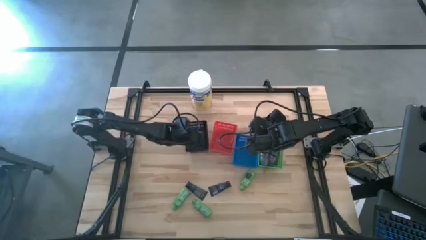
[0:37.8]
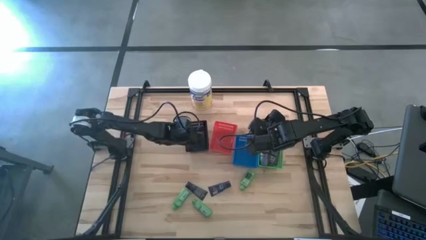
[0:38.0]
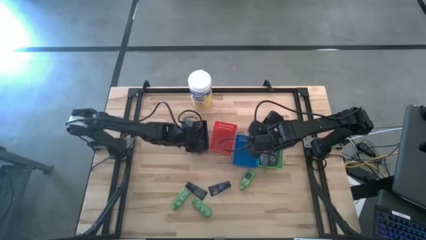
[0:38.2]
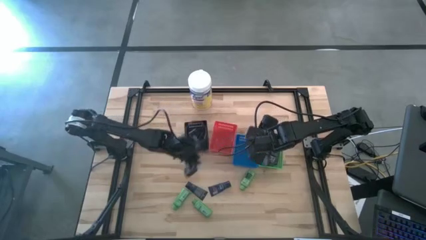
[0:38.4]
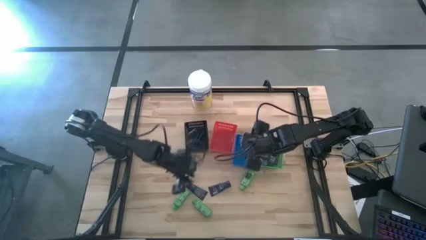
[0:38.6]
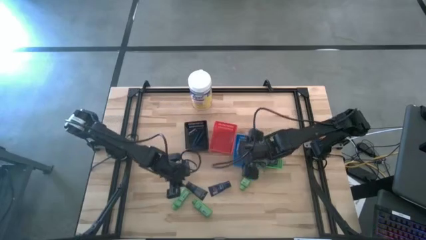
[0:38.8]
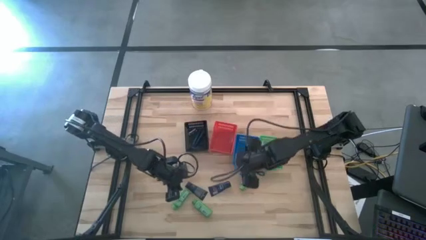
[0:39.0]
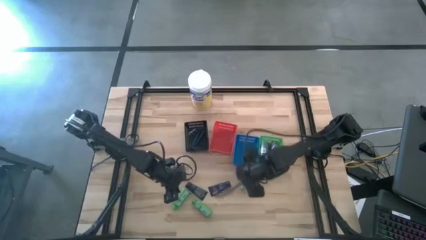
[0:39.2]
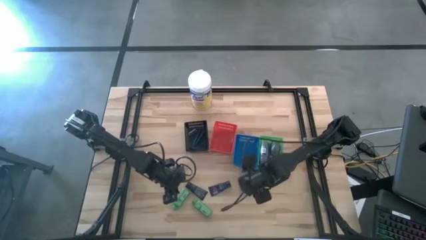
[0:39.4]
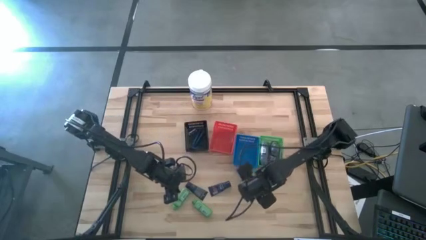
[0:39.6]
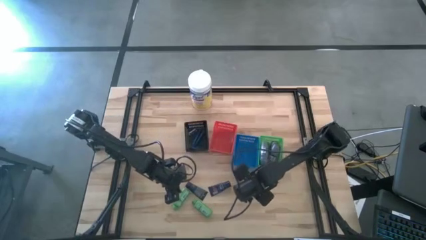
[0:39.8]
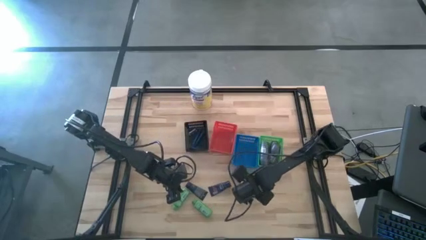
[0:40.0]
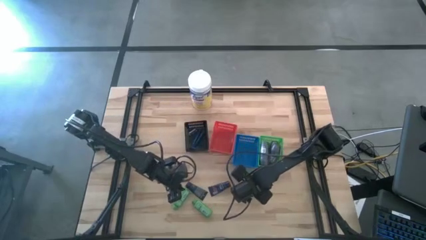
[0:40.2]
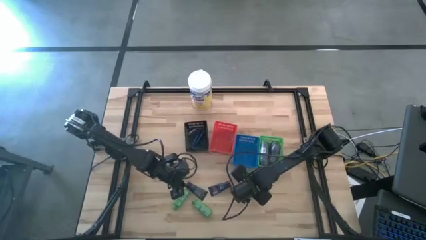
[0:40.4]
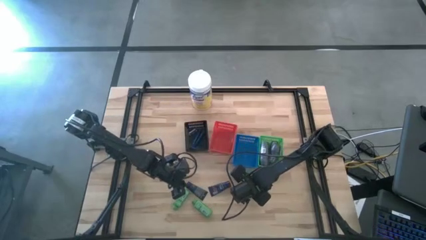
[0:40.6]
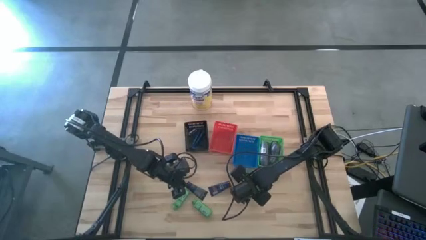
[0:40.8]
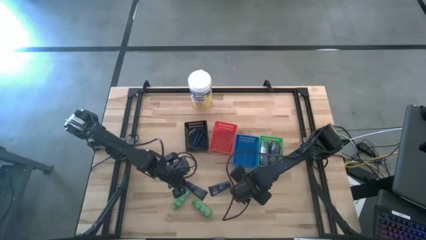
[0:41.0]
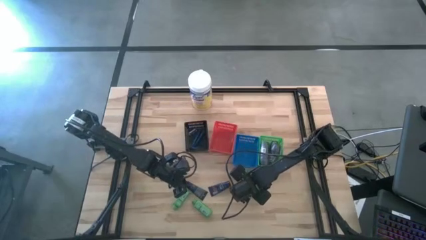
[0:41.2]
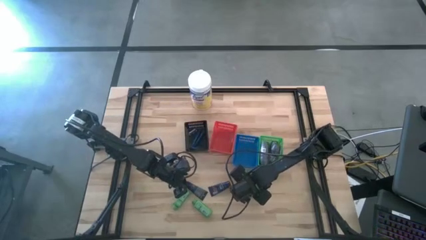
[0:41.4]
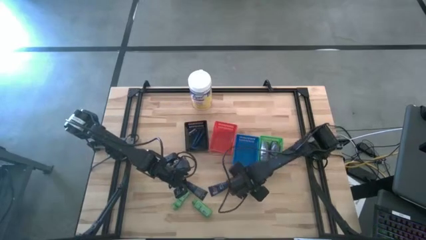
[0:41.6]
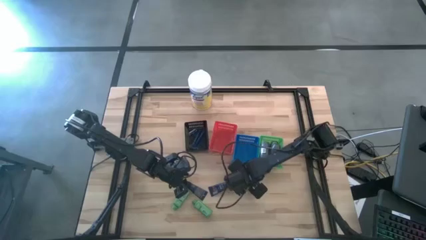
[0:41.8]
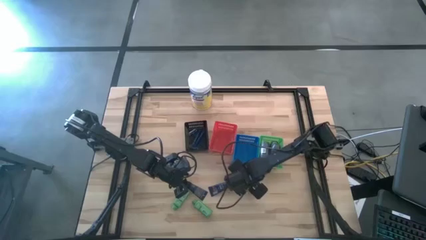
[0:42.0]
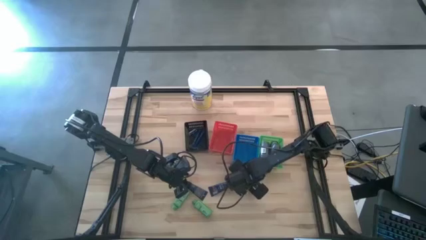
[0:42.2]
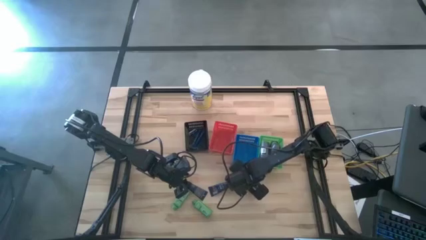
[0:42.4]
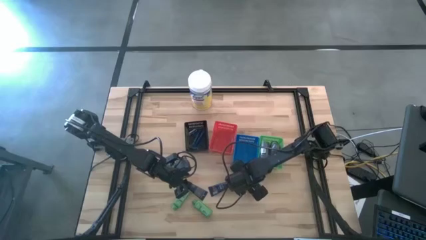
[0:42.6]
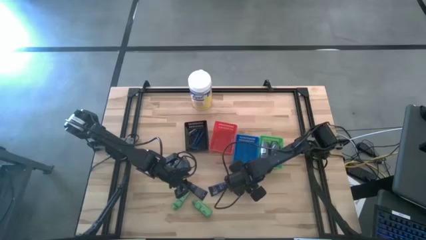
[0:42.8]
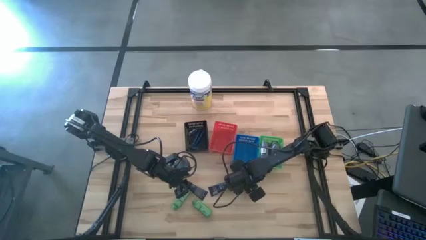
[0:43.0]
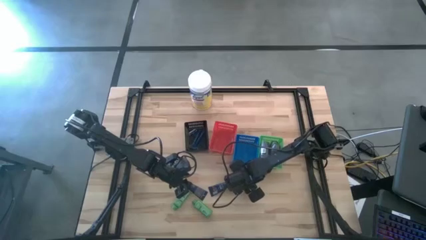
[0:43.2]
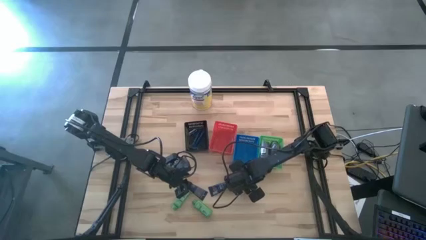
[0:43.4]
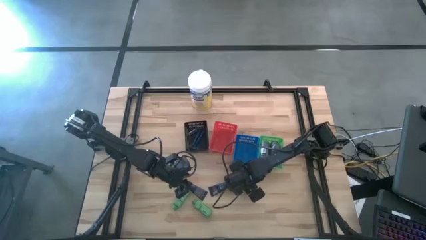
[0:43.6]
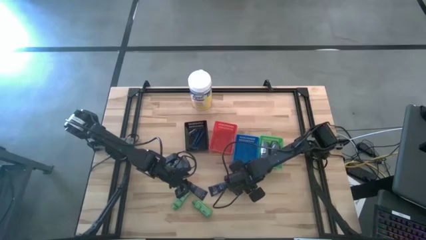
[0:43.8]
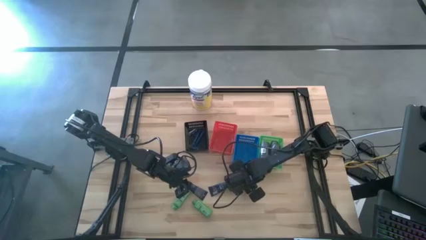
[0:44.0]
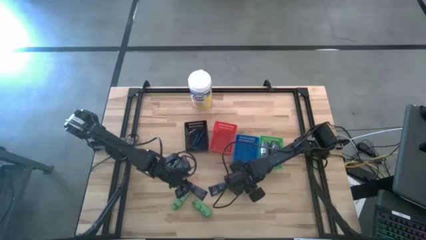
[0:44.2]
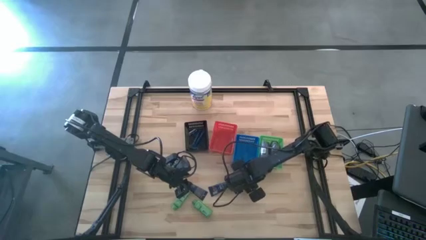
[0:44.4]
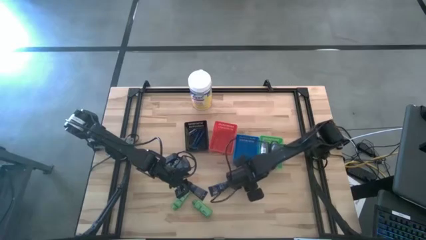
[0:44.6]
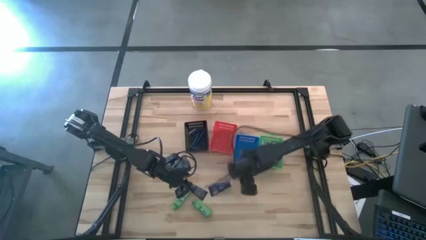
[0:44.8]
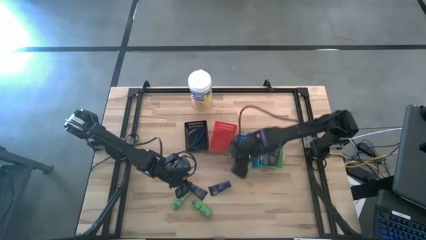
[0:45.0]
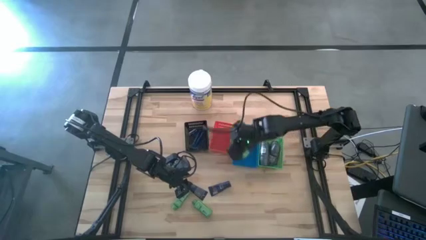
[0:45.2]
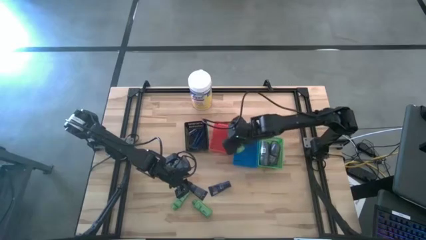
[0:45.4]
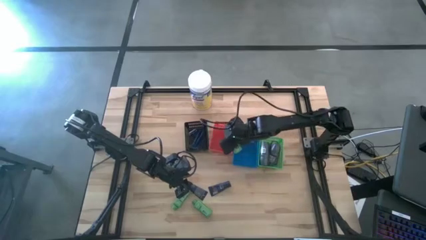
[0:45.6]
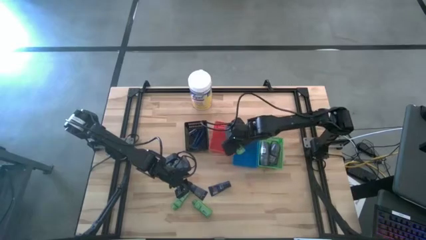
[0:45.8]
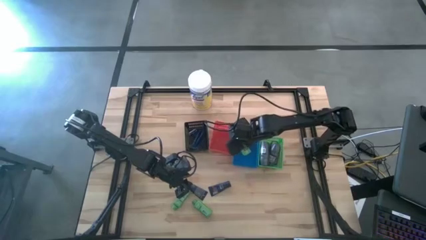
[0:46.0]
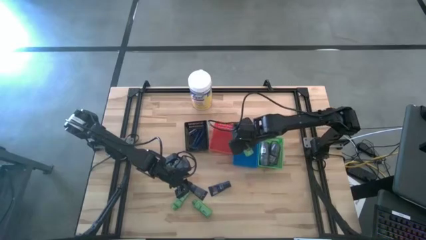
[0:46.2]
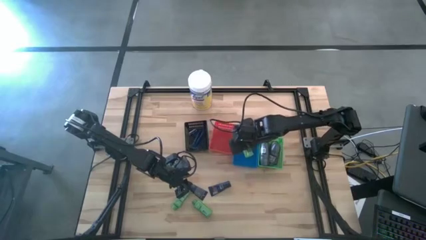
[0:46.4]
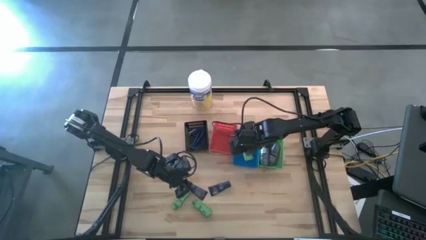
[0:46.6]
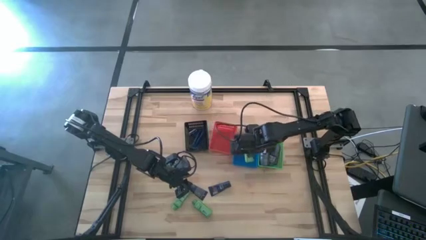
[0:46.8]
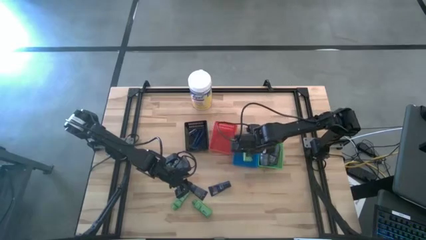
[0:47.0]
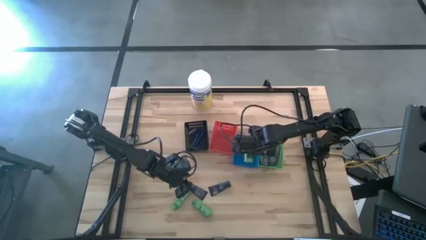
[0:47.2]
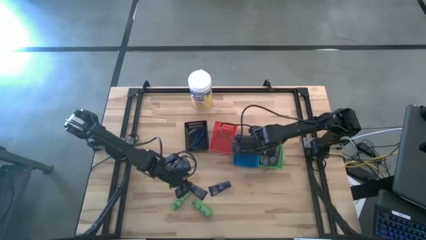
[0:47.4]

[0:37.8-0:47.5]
Task: Pick & Place Travel size toiletries
Put the green shampoo into the blue bin

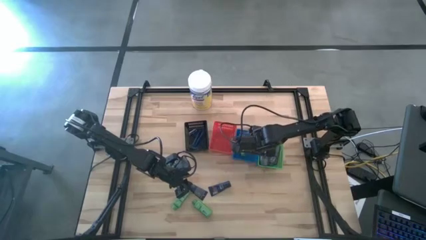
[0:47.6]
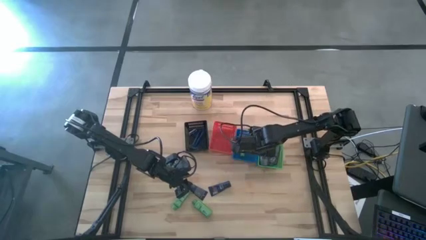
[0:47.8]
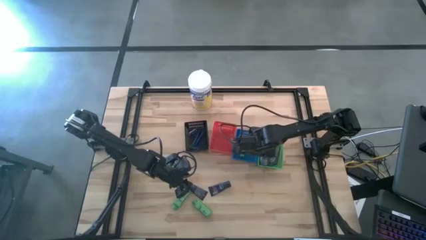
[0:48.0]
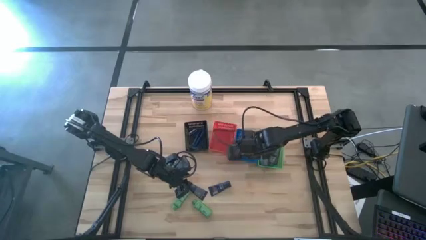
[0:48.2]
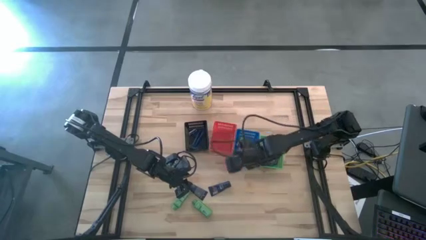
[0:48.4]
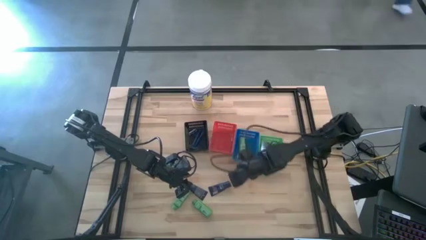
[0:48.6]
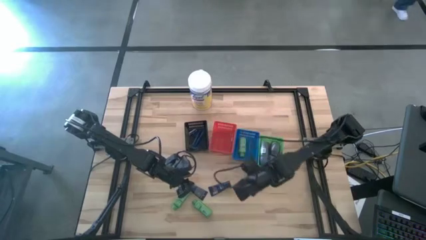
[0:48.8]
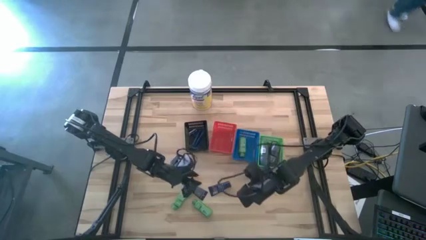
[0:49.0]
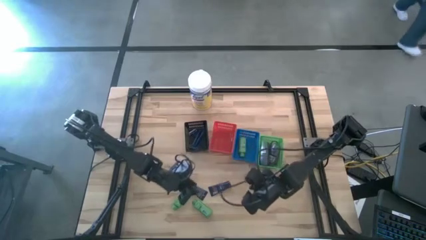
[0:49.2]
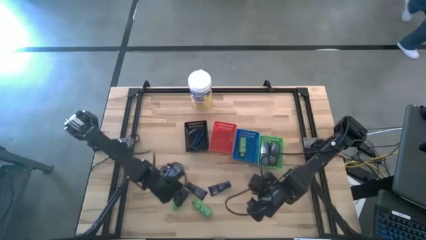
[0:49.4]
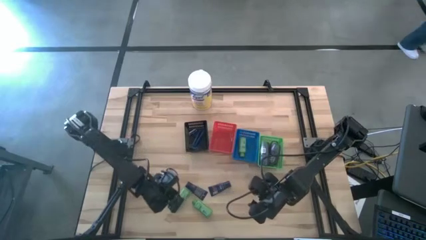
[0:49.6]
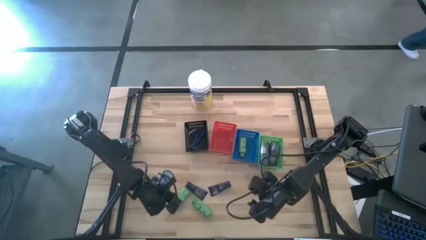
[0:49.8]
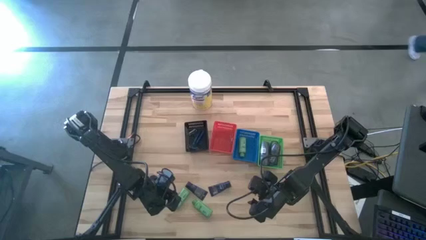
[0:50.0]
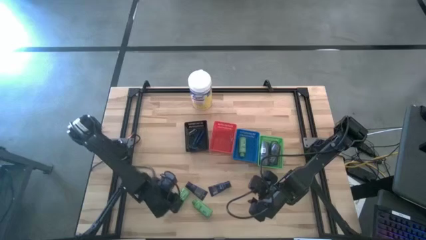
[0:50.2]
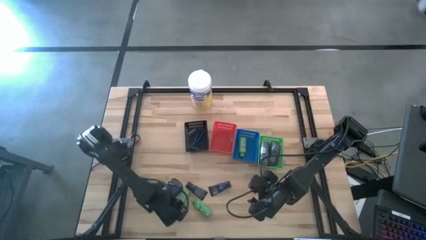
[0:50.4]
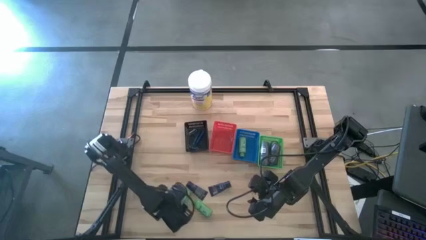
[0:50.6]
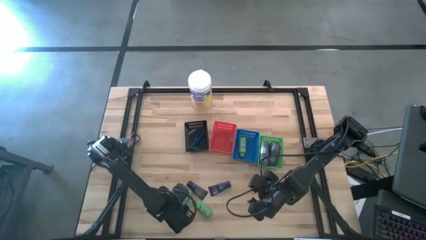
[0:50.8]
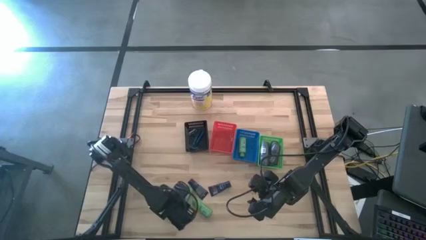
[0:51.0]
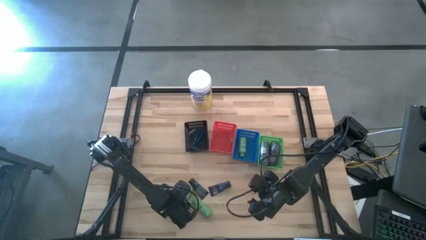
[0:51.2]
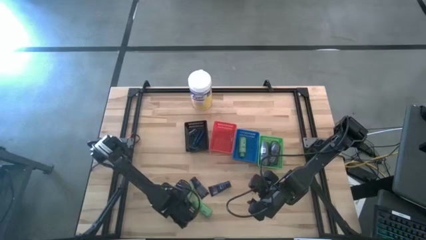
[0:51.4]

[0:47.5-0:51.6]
Put the green shampoo into the blue bin

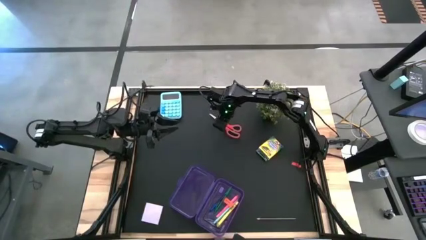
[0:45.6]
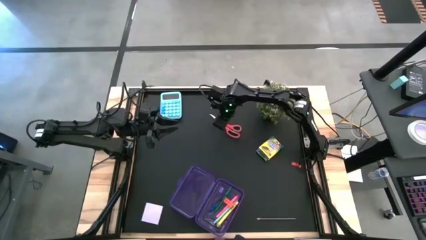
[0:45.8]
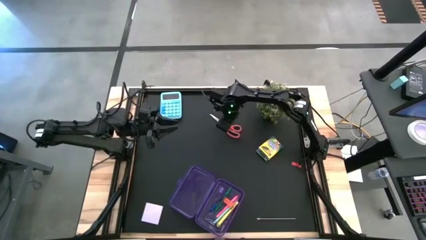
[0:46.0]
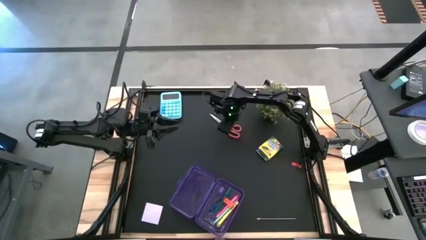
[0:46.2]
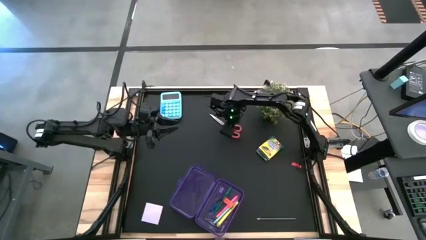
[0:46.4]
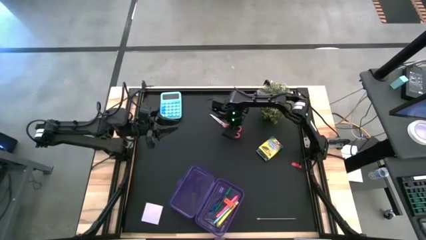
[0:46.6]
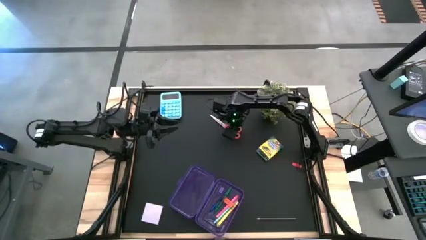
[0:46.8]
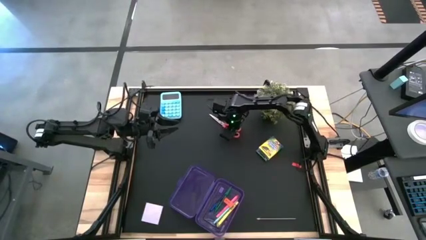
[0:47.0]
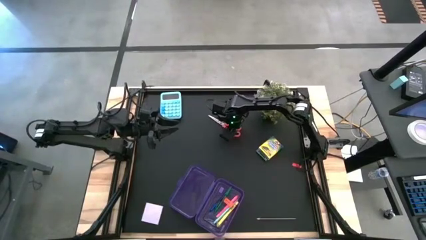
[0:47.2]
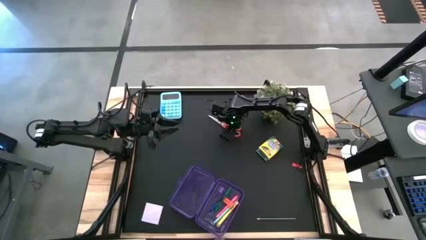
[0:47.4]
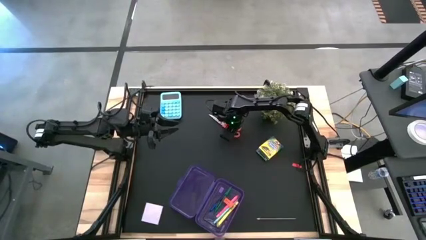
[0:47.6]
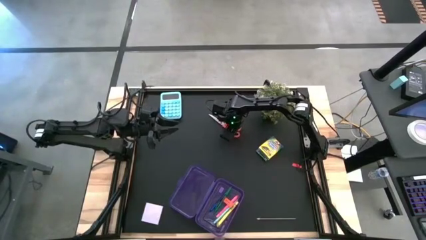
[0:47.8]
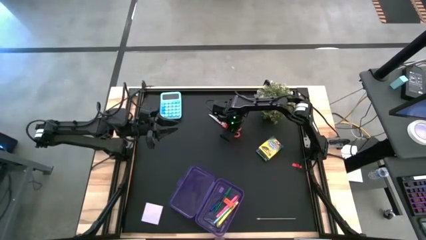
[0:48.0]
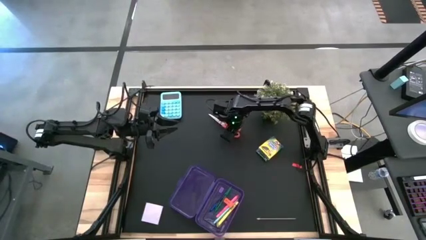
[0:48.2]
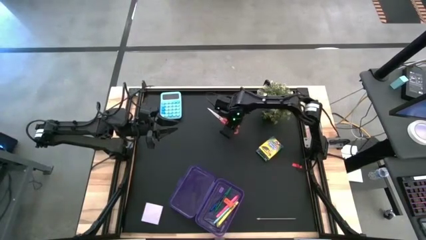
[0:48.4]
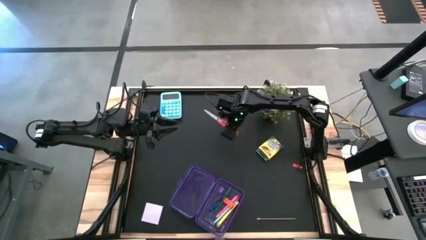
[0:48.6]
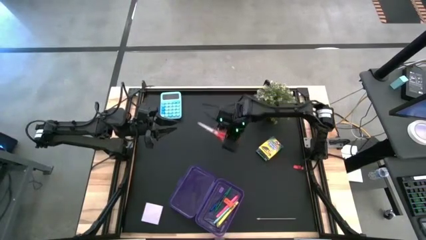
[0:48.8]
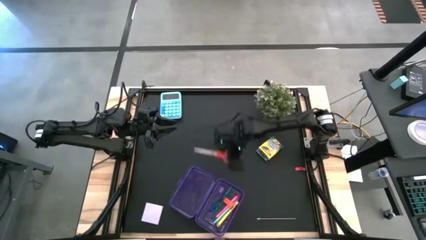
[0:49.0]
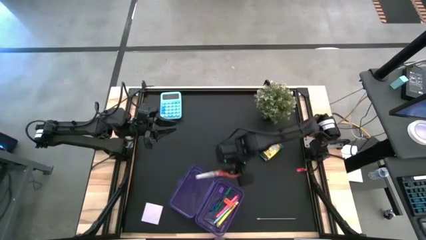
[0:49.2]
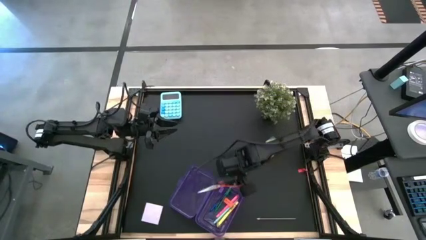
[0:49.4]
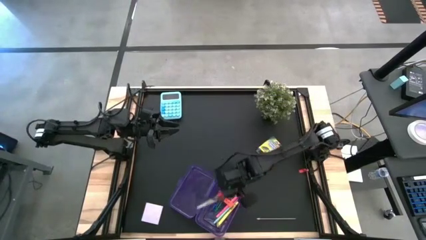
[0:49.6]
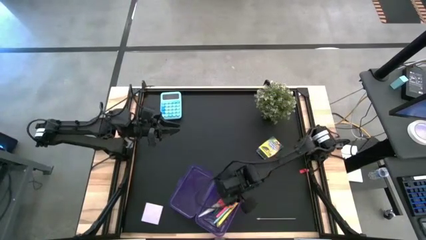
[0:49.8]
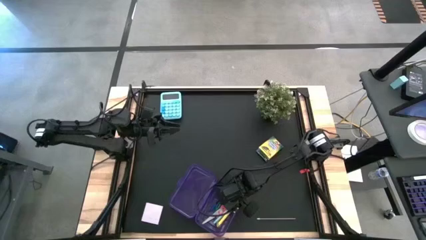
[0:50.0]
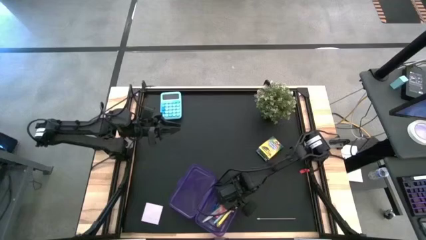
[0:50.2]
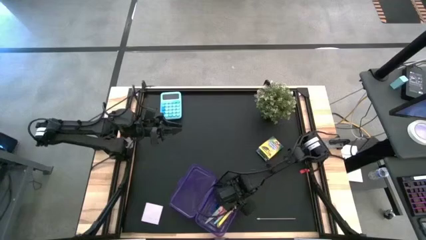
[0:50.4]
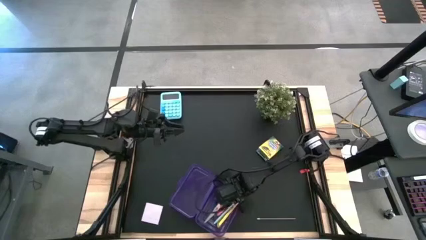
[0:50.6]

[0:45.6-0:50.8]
Task: Pack school essentials
Put the scissors into the purple supply box
